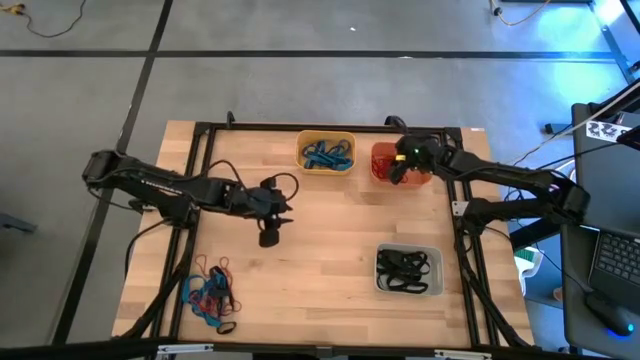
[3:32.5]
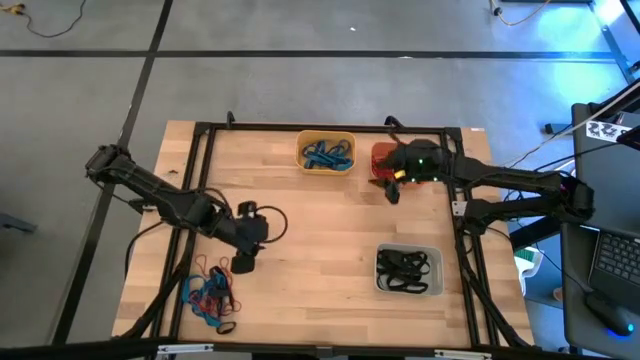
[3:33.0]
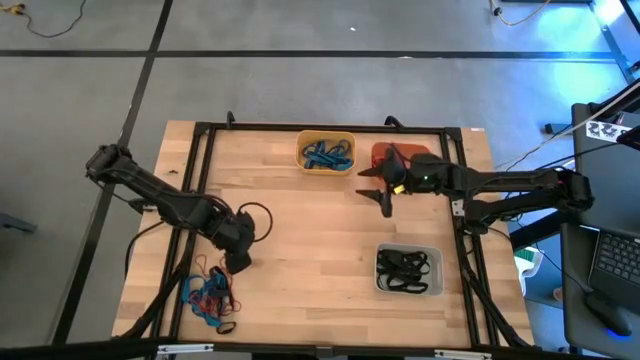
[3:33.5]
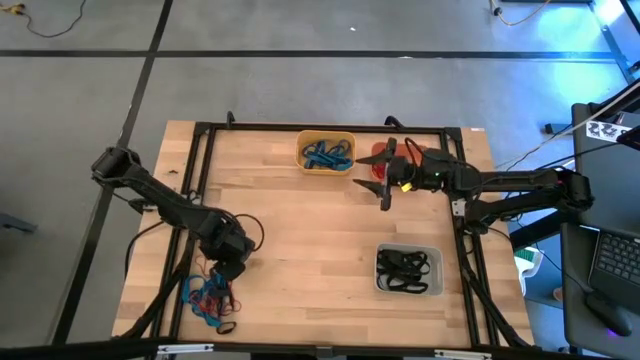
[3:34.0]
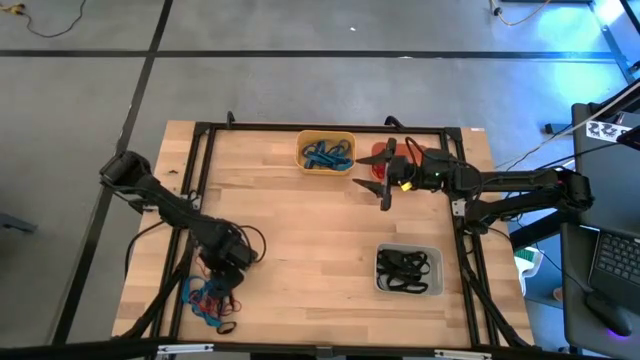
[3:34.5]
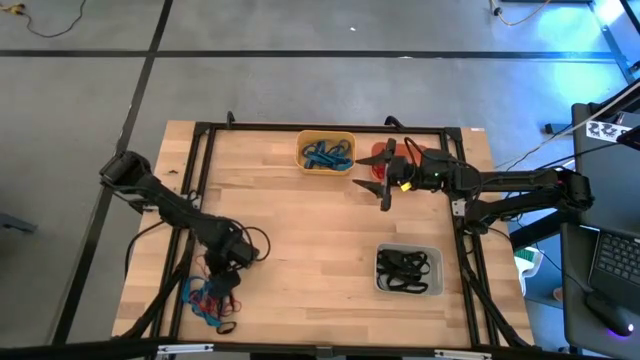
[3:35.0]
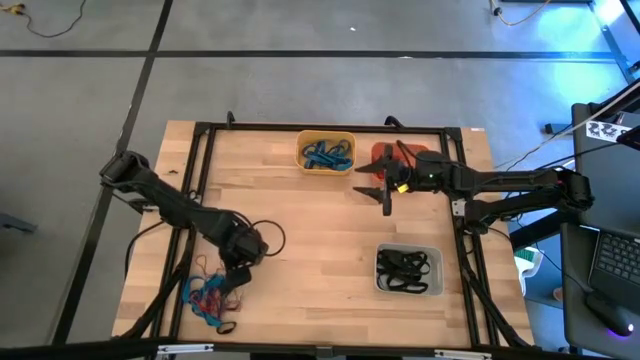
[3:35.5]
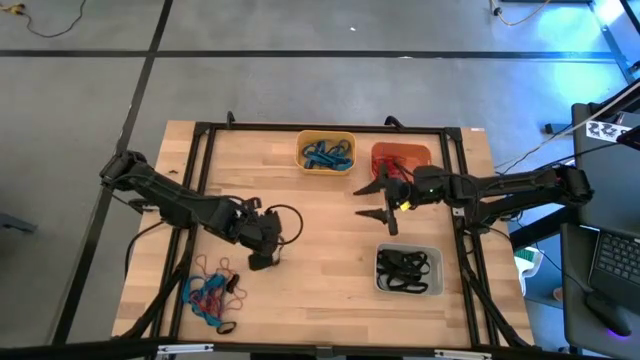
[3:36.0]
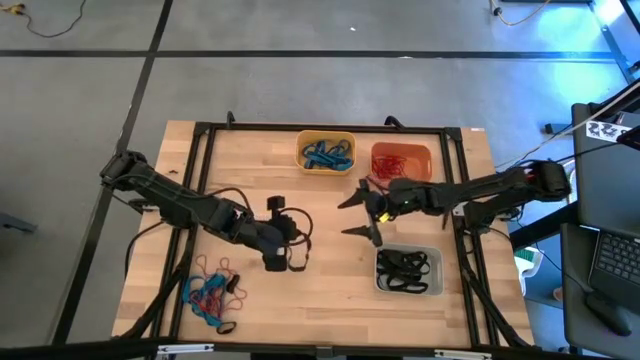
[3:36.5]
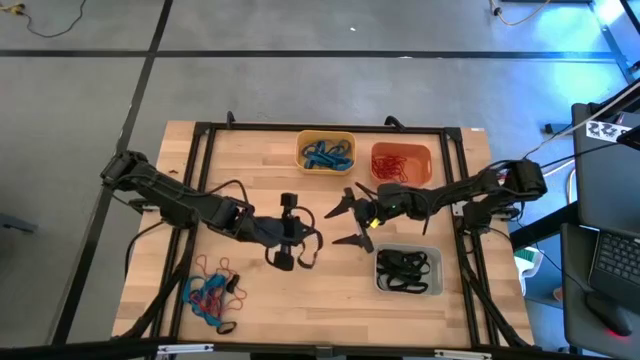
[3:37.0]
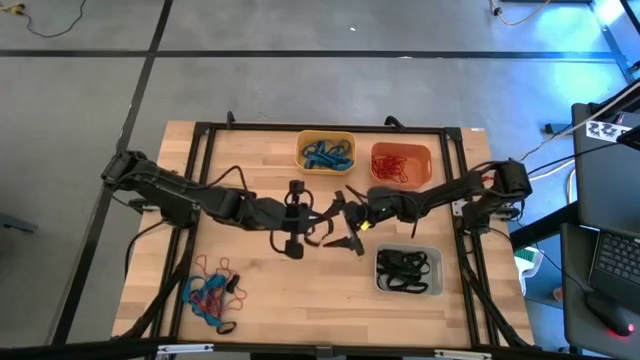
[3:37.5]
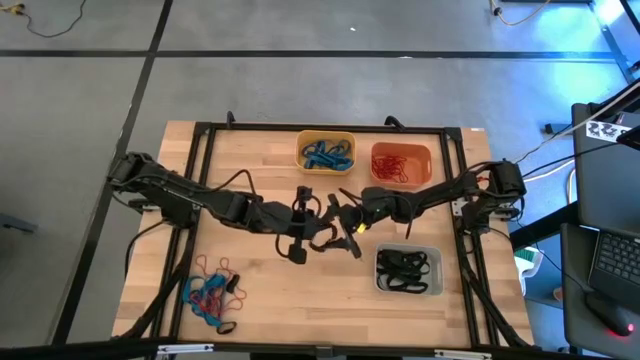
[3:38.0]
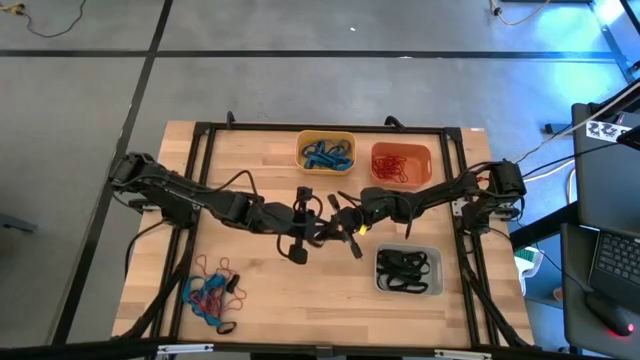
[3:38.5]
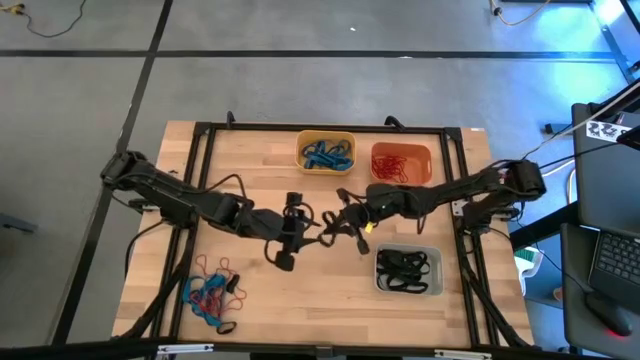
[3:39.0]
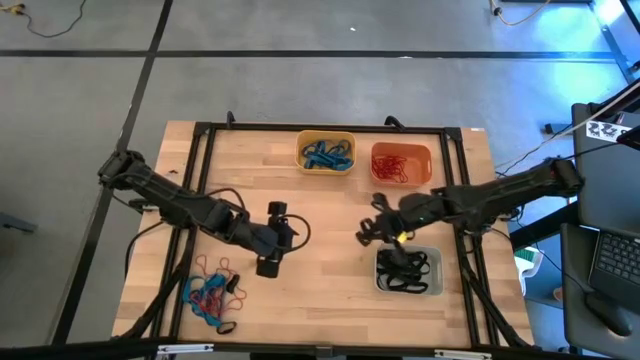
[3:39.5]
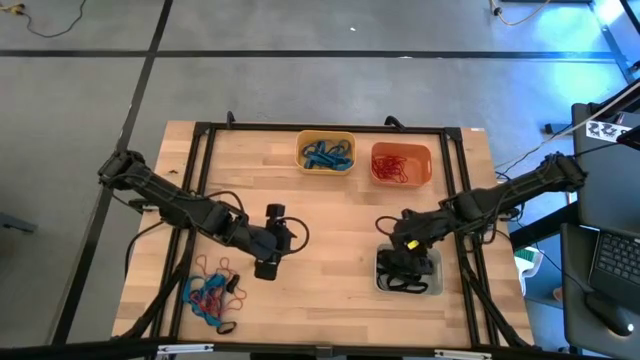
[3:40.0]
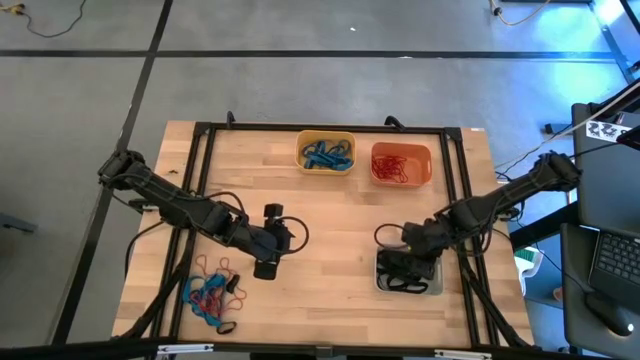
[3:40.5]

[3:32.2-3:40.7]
Task: Sort rubber bands into baskets
Put the black rubber band into the white bin

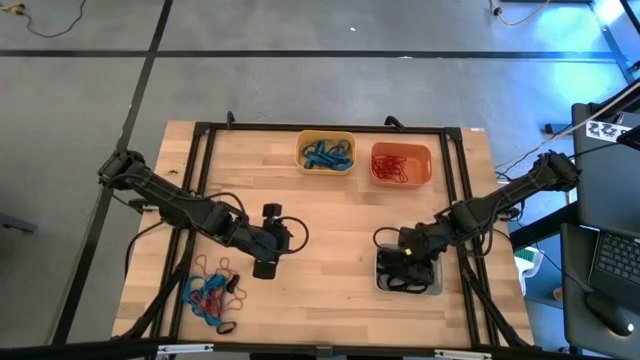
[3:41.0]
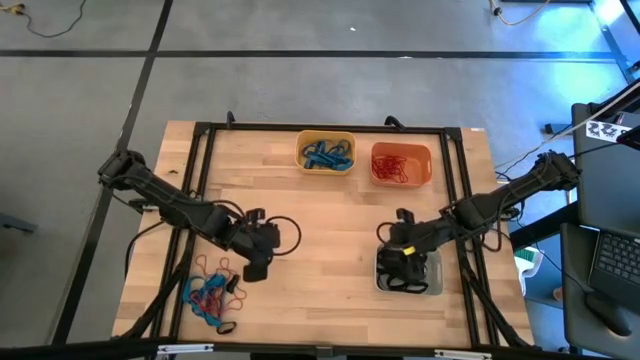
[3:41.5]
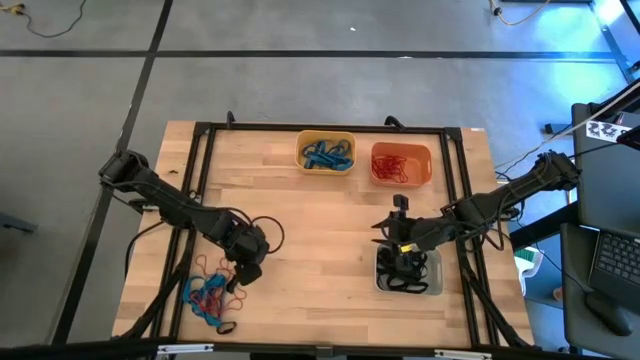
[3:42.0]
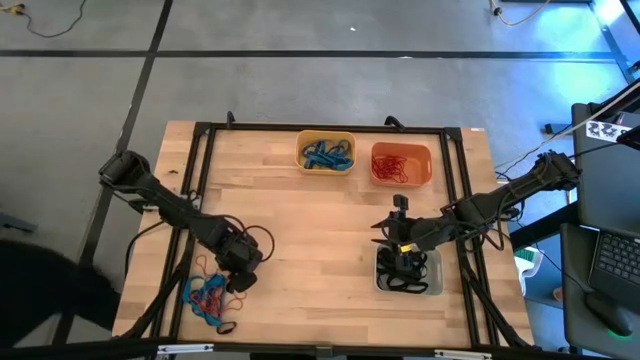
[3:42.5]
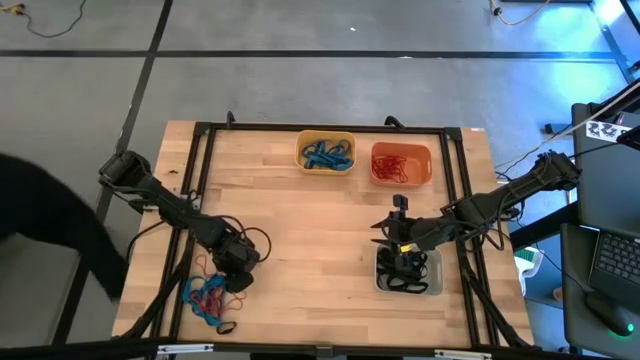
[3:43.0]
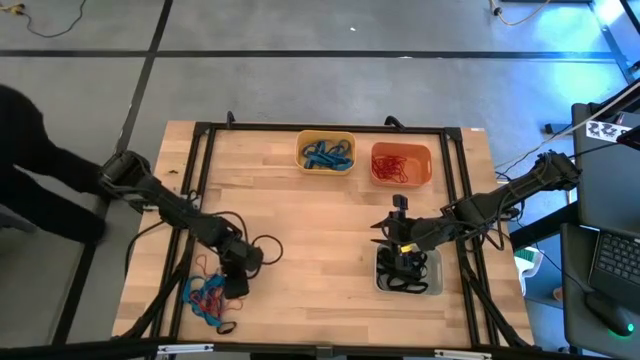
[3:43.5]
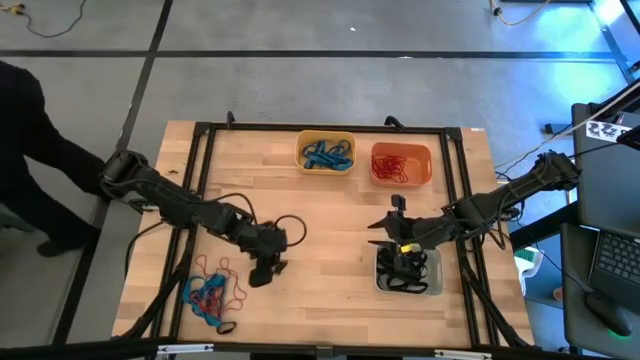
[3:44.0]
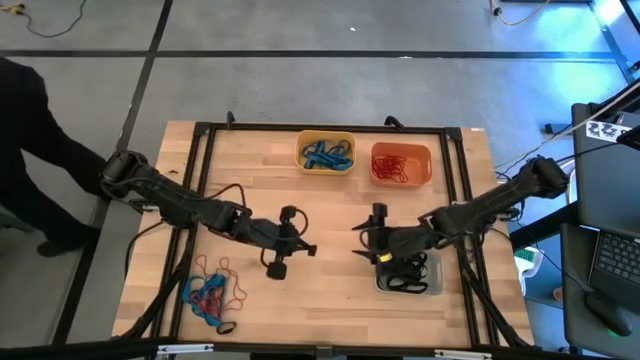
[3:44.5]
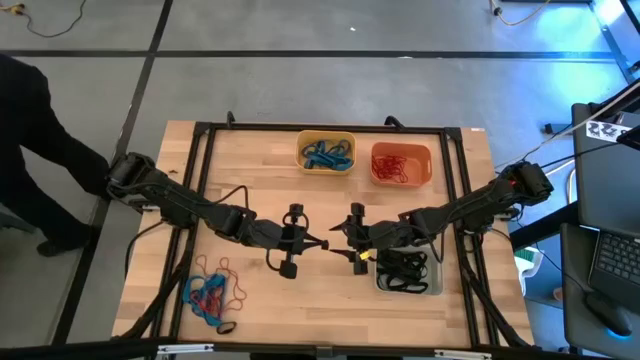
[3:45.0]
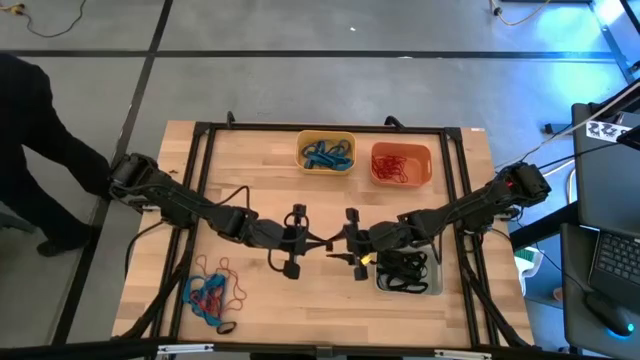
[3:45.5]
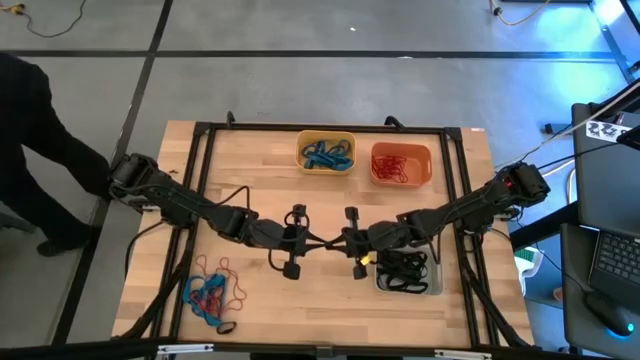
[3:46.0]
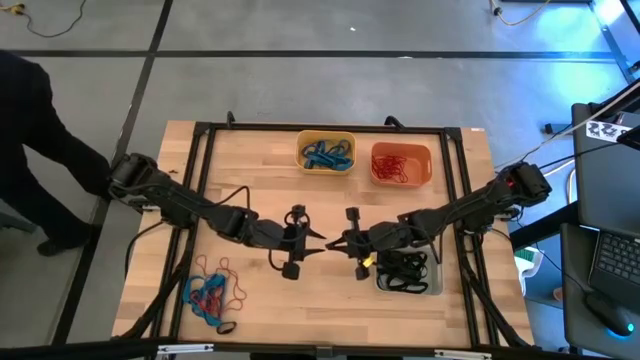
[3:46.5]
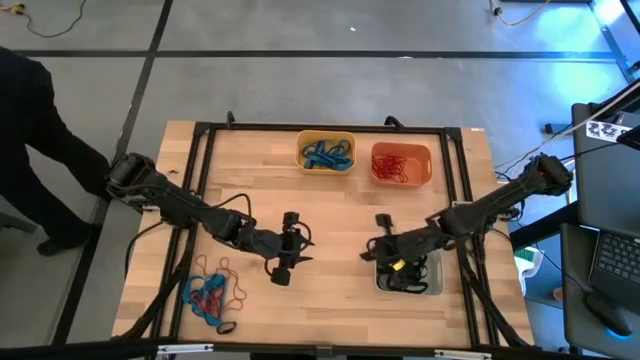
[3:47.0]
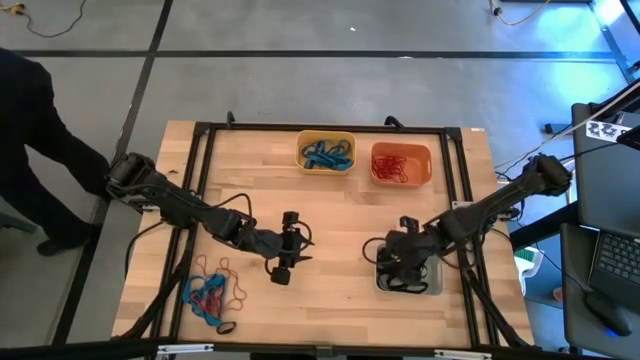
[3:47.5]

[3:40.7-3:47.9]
Put the black rubber band into the white bin

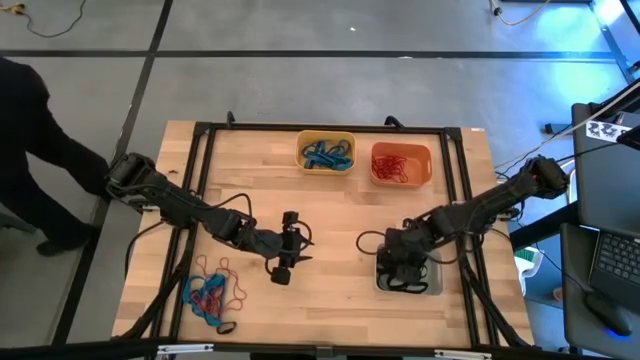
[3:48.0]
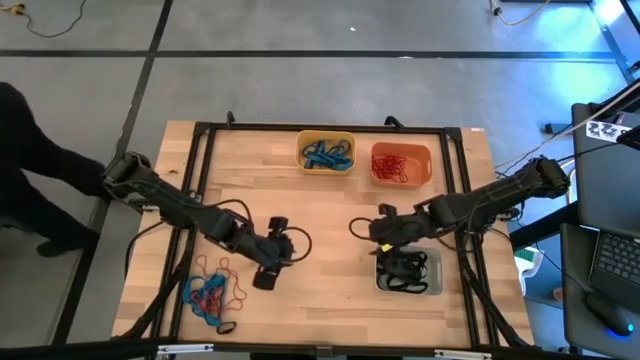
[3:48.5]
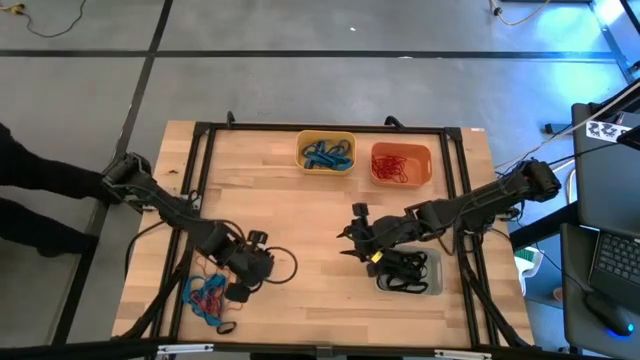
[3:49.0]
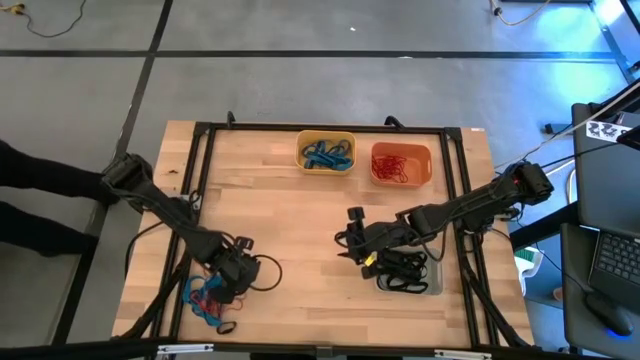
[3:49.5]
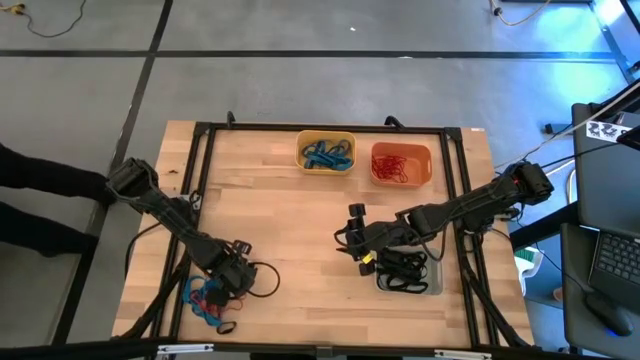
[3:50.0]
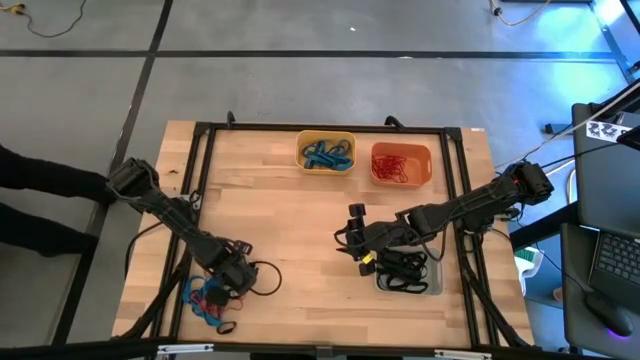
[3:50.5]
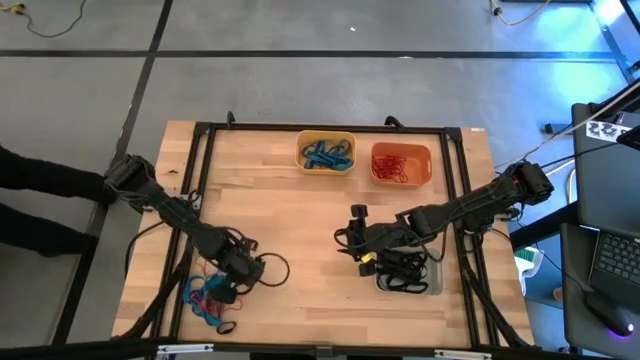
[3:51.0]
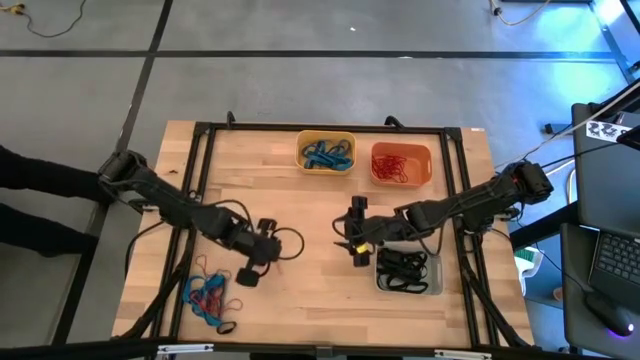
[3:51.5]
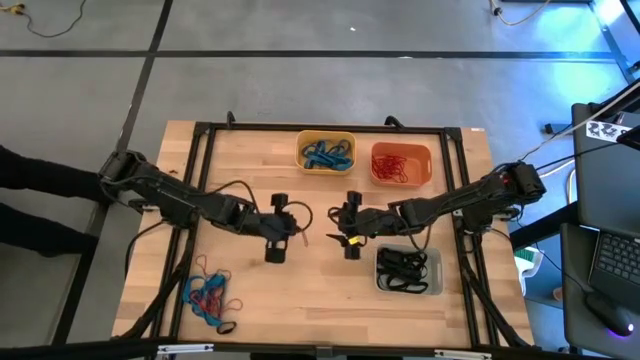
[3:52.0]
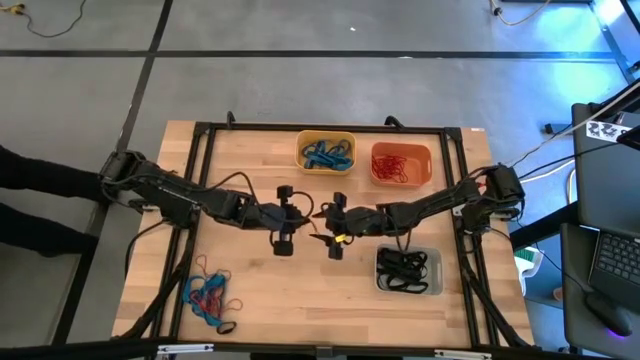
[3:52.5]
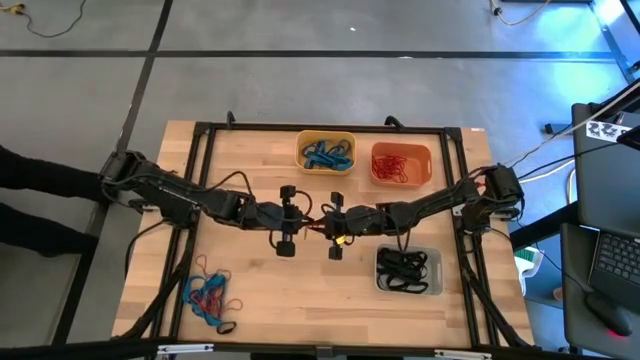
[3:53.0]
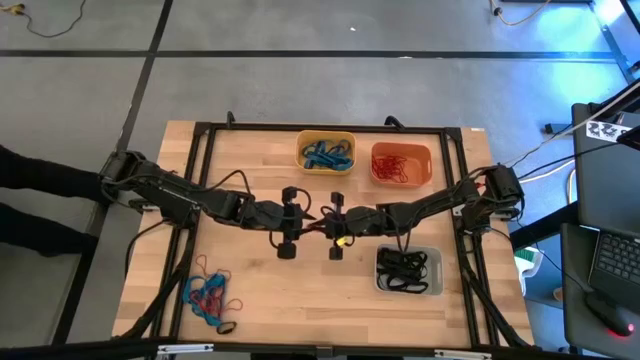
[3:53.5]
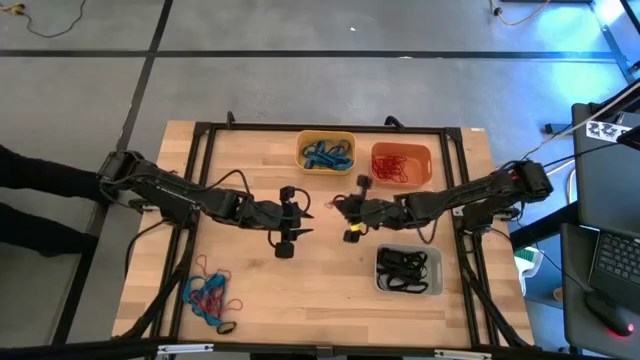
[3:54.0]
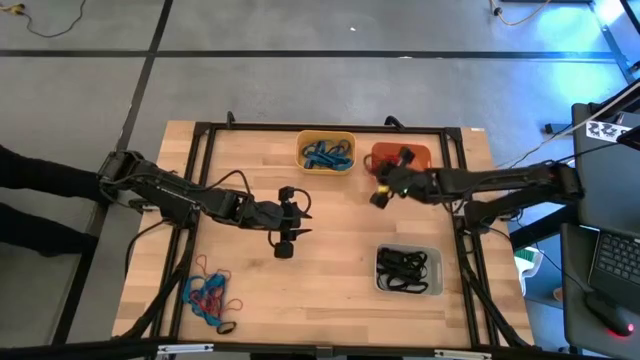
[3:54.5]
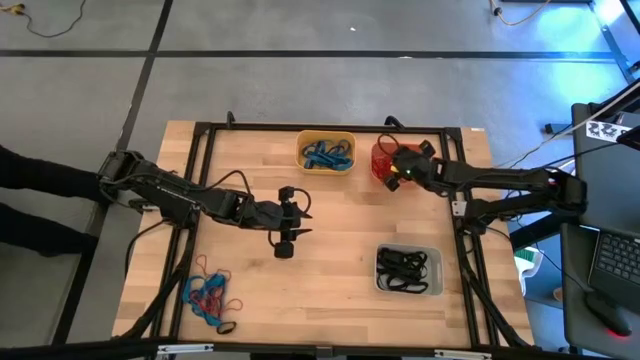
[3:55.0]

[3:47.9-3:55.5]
Put the red rubber band into the orange bin
